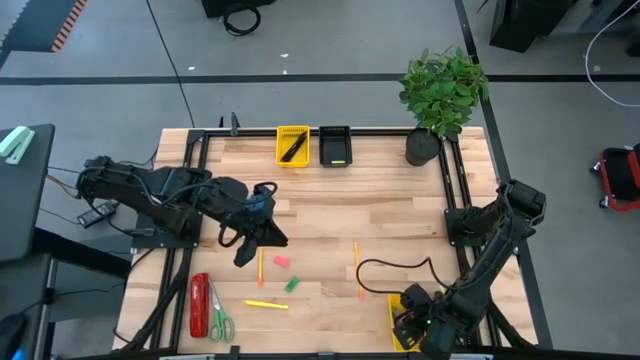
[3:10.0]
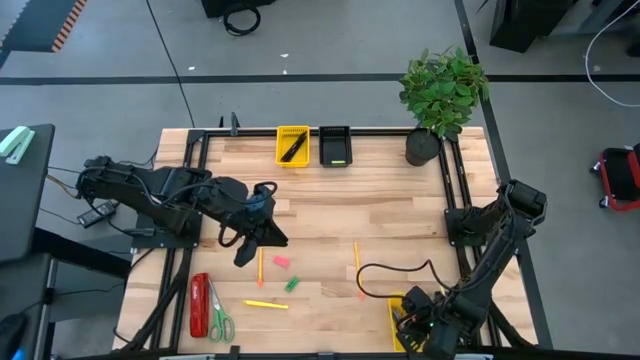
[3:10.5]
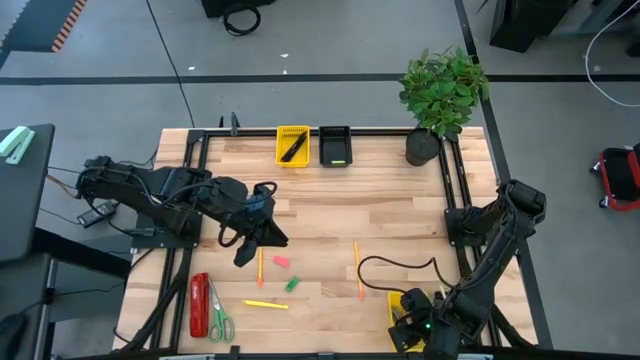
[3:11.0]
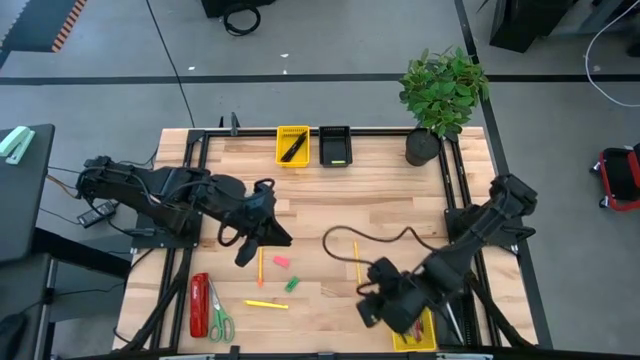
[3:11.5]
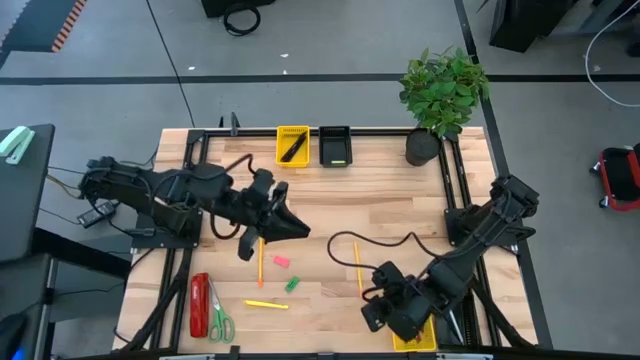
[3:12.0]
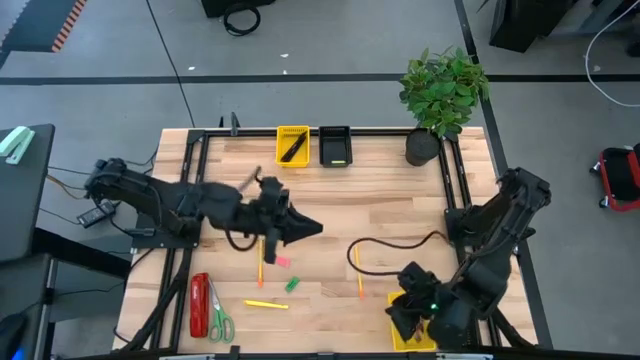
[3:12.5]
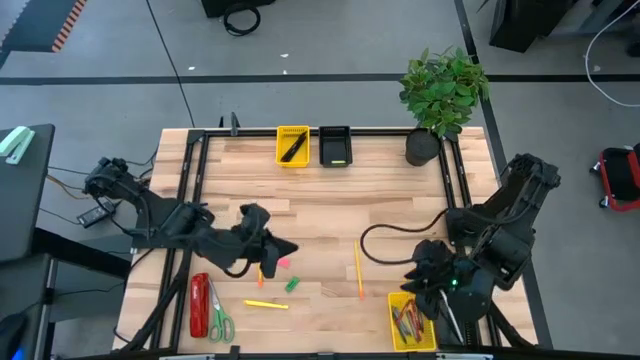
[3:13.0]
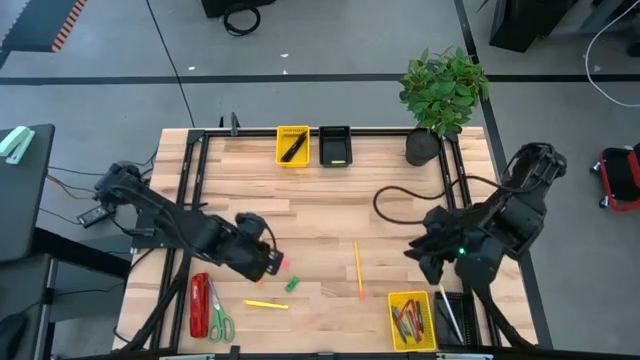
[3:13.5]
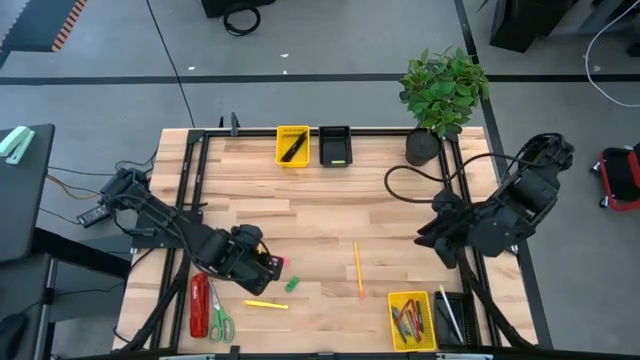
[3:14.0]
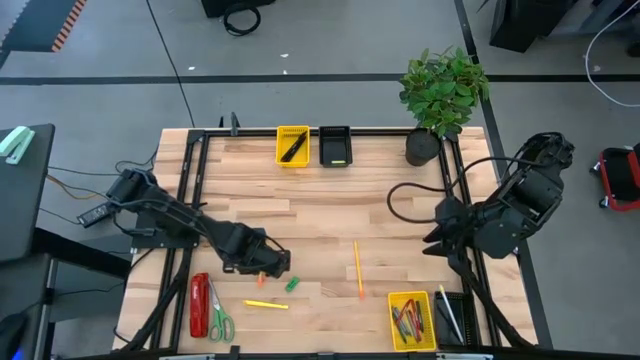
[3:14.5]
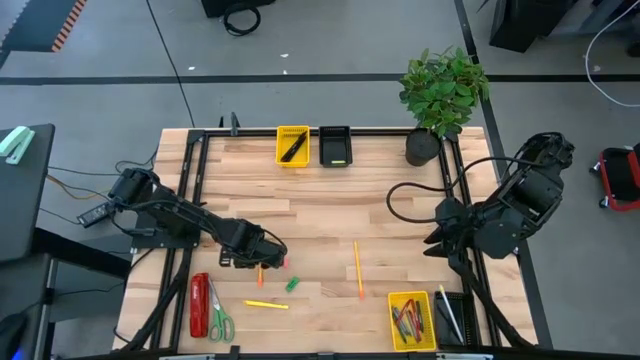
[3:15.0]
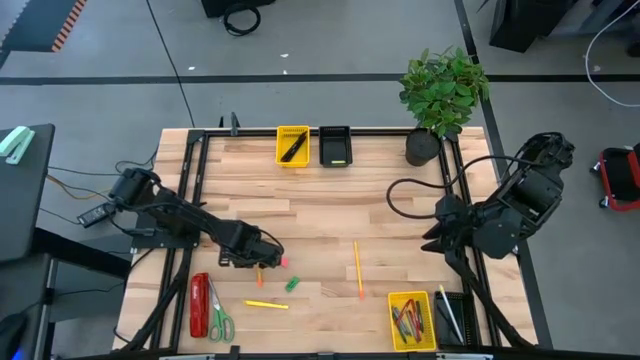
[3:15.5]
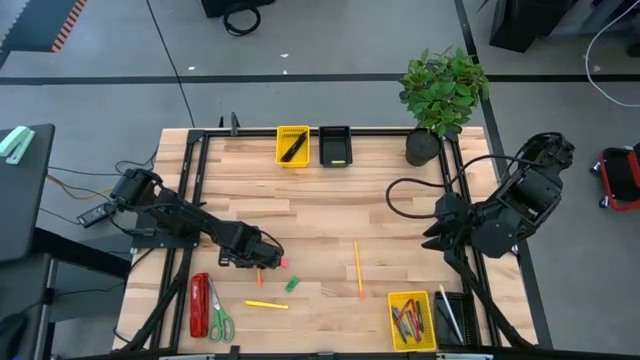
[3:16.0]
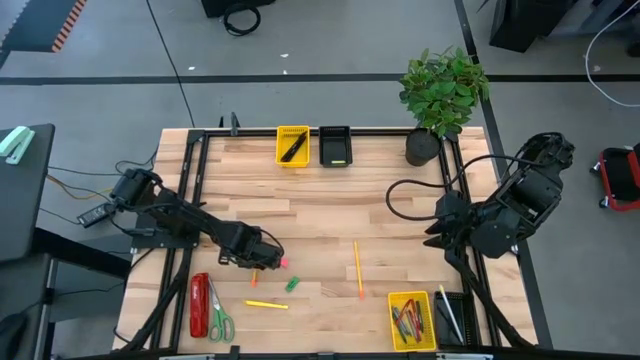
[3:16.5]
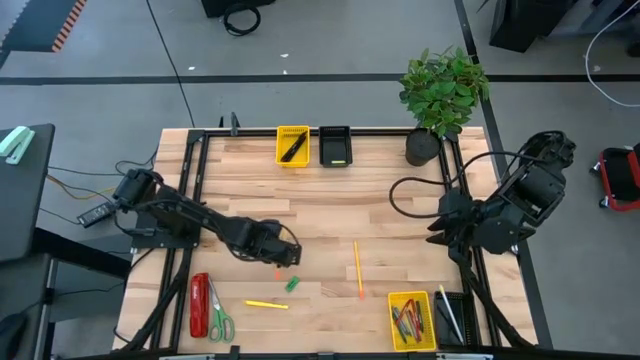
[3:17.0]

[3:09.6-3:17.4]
Task: Sort crayons/erasers/pens/pencils in bins
Put the left yellow pencil into the bottom black bin

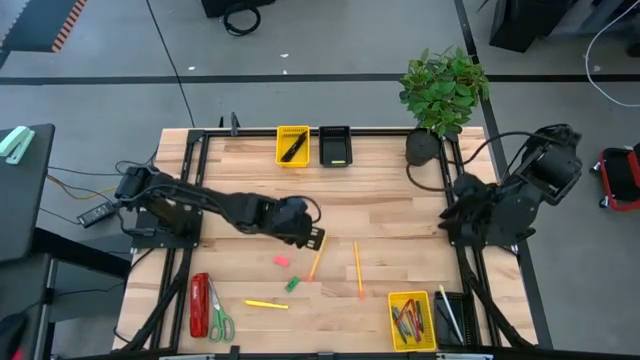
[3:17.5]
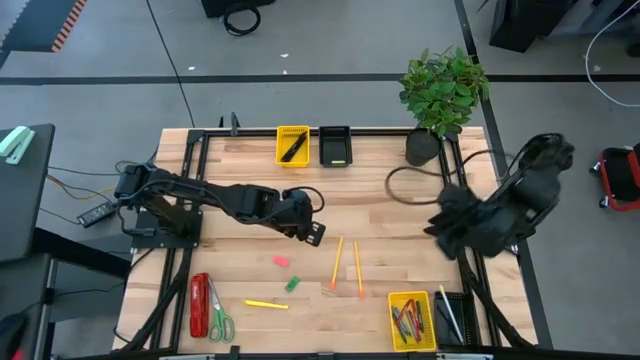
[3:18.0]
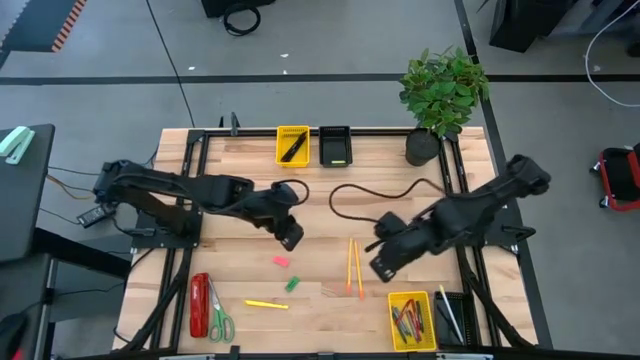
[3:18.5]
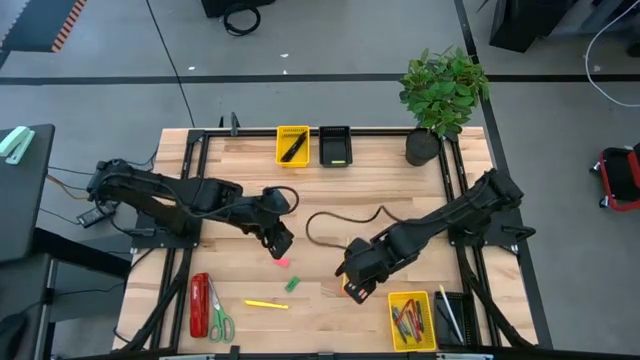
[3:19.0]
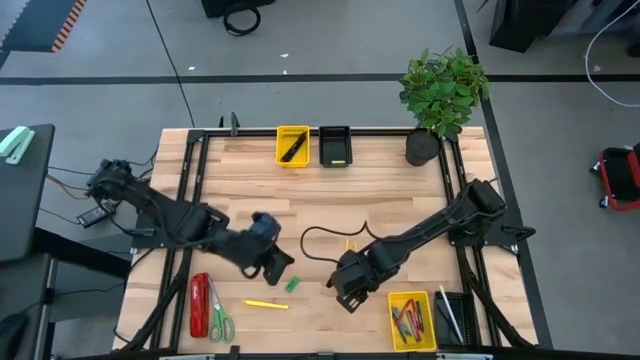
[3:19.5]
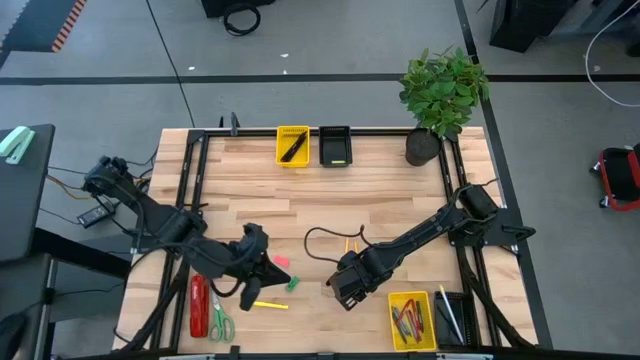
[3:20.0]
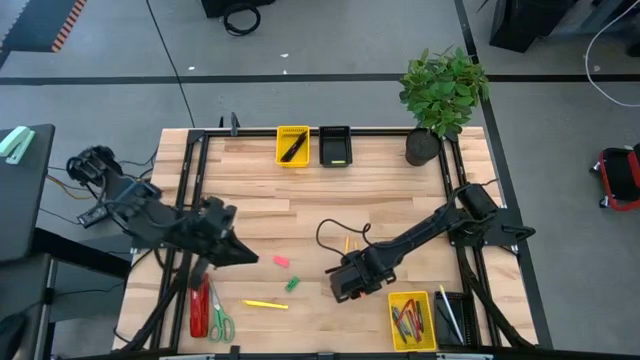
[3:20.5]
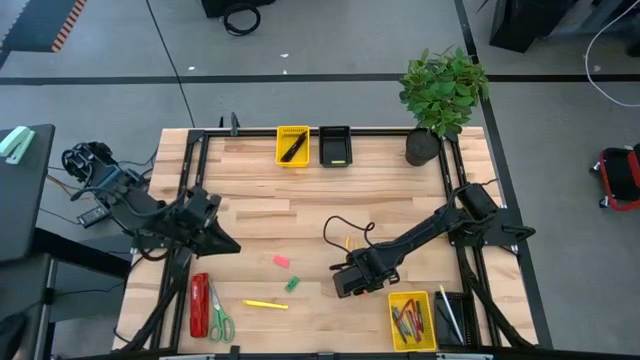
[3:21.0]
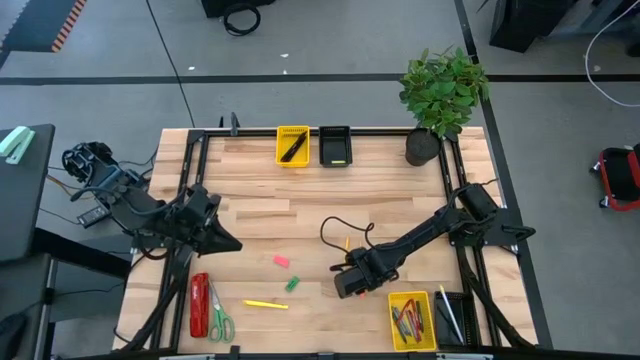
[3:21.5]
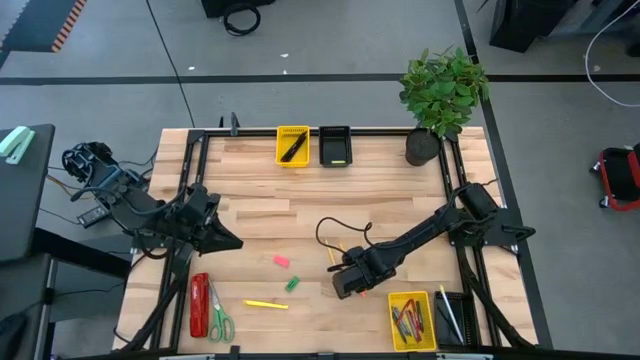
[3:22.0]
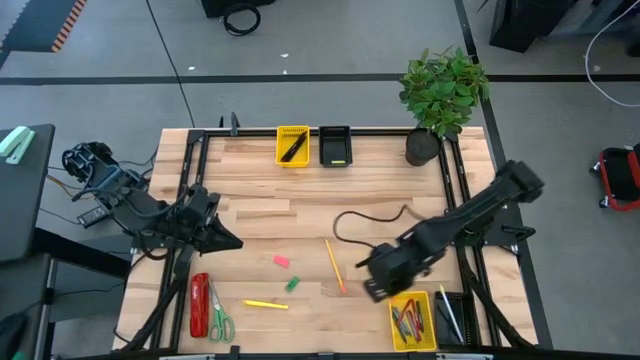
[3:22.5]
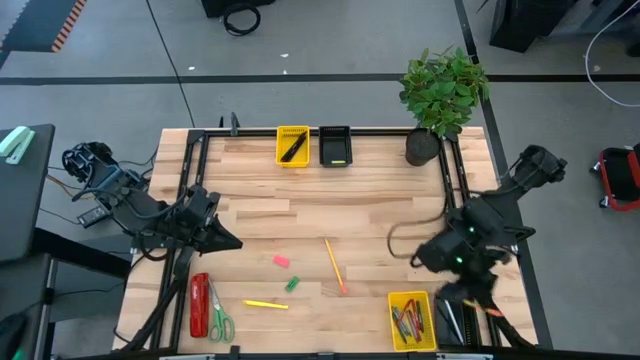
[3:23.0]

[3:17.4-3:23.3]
Put the right yellow pencil into the bottom black bin

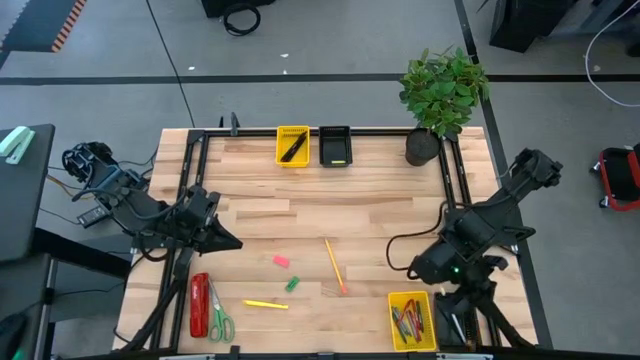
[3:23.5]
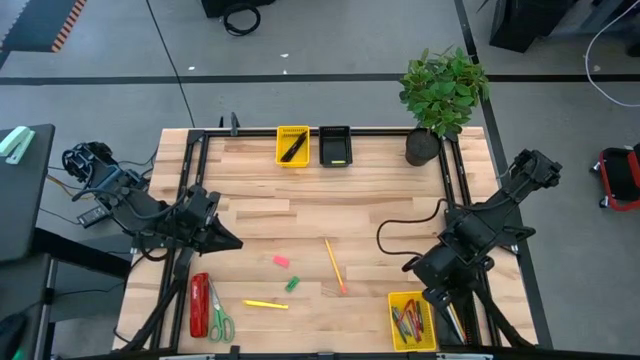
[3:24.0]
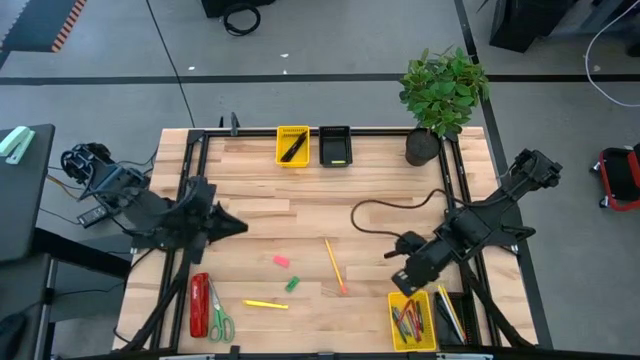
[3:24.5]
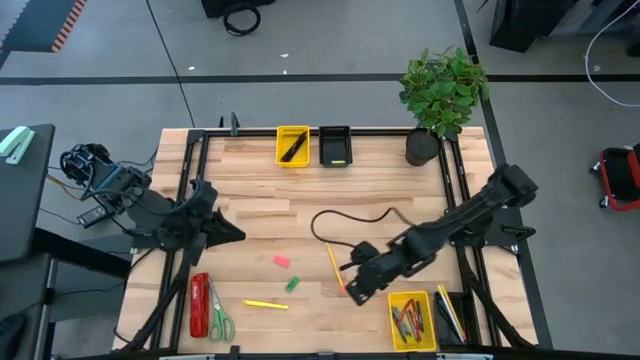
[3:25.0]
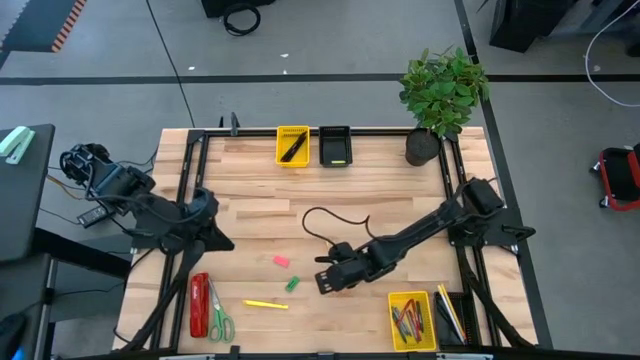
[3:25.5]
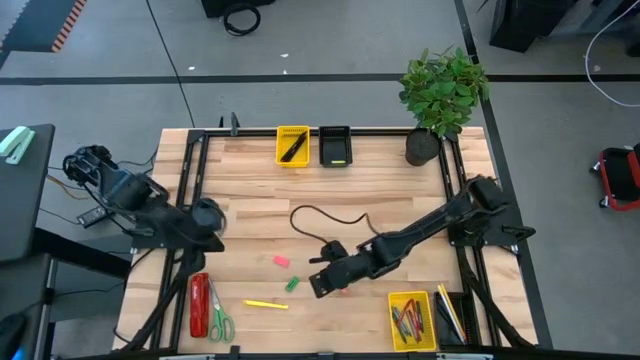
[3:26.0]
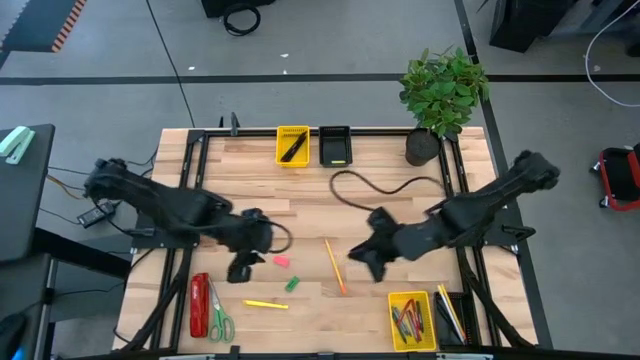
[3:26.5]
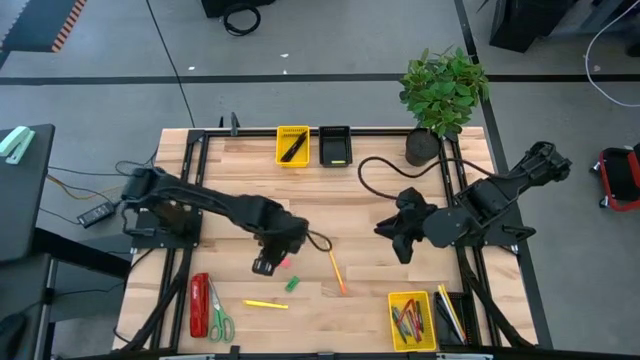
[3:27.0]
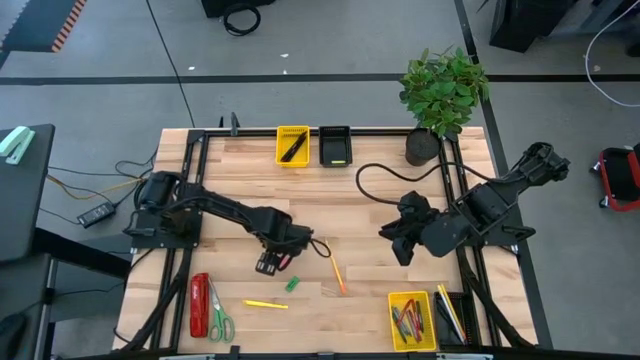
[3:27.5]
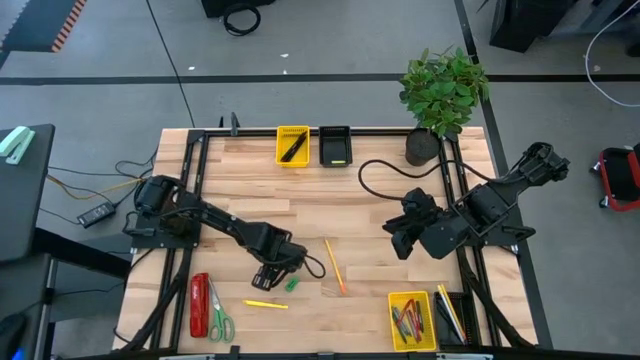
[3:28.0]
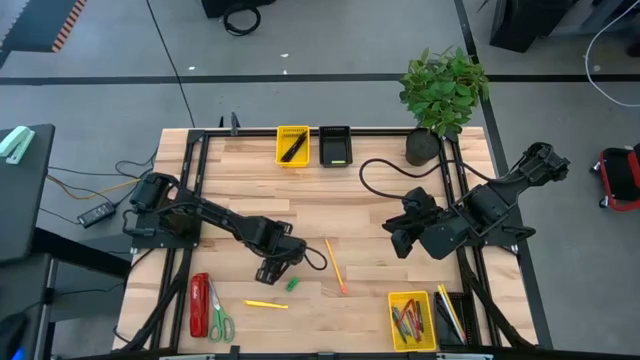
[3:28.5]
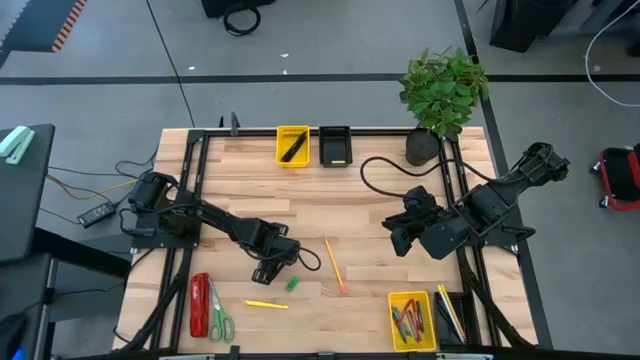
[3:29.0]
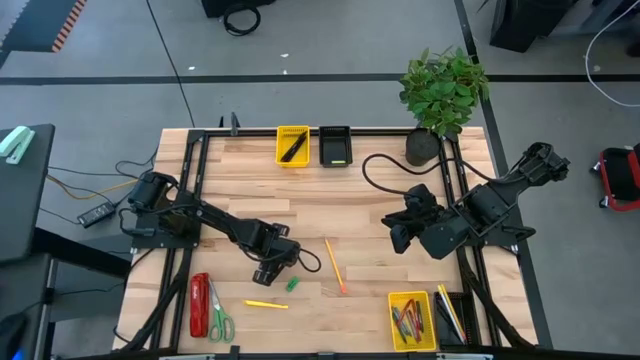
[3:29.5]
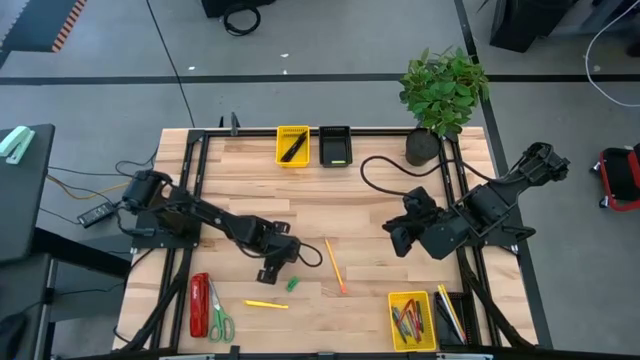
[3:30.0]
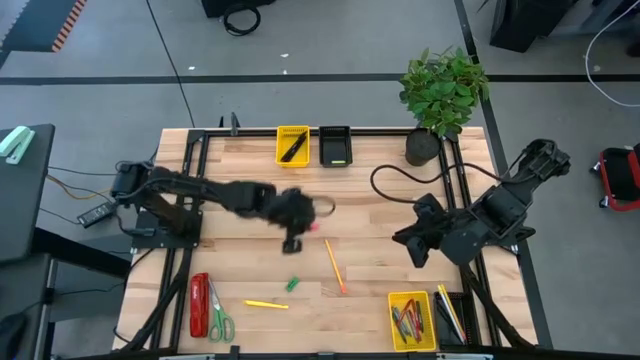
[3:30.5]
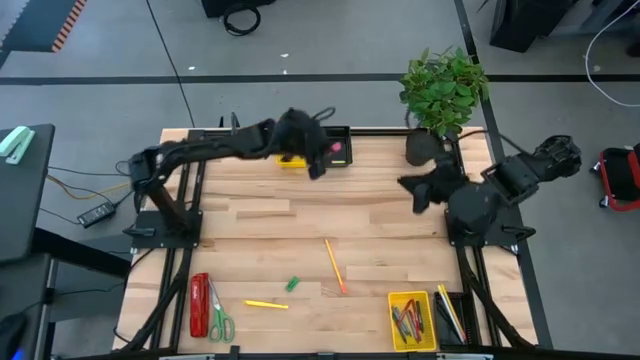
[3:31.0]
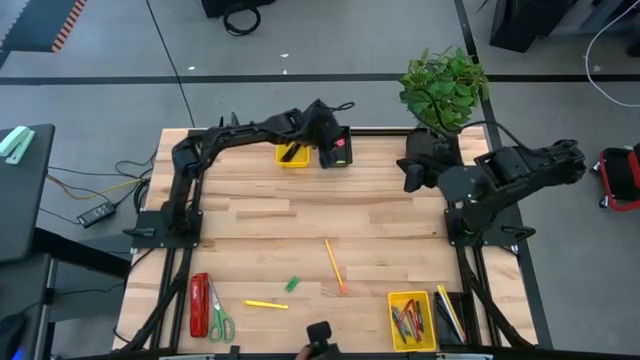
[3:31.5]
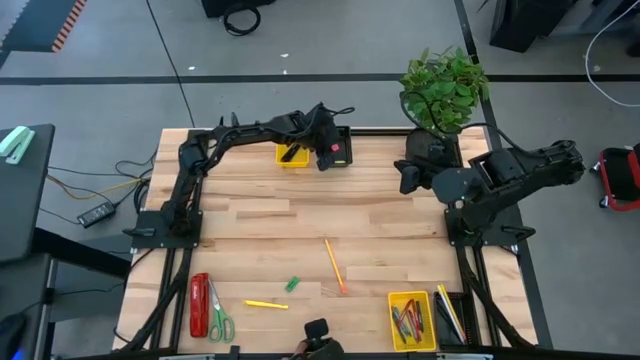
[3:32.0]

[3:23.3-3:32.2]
Put the pink eraser into the top black bin
